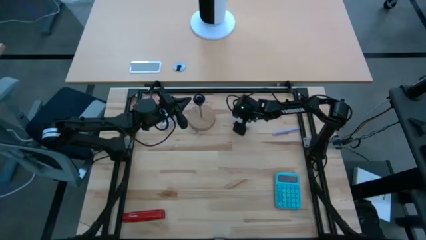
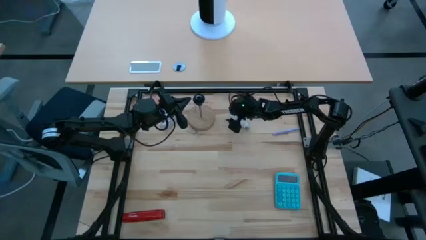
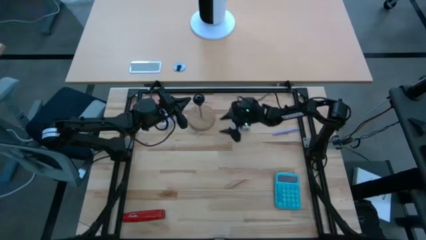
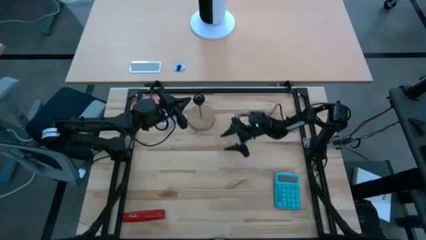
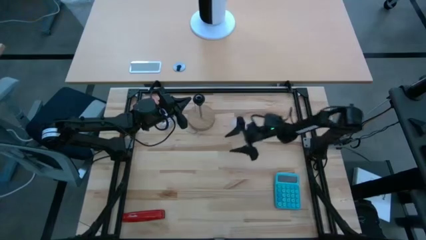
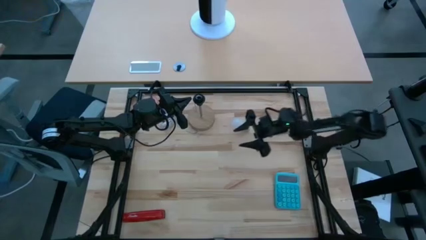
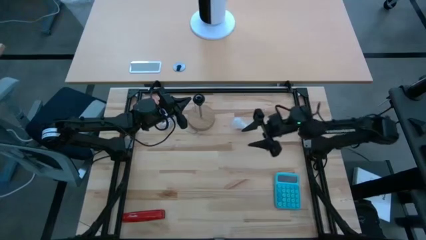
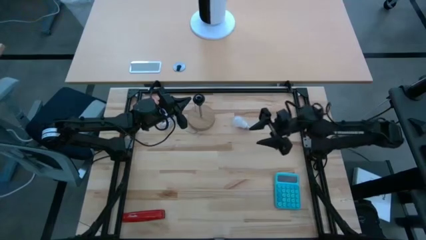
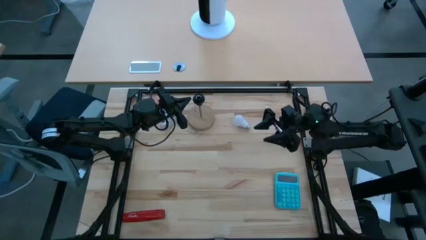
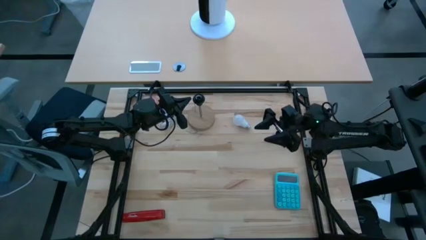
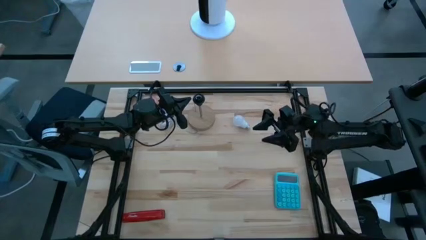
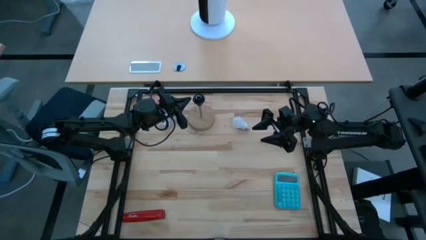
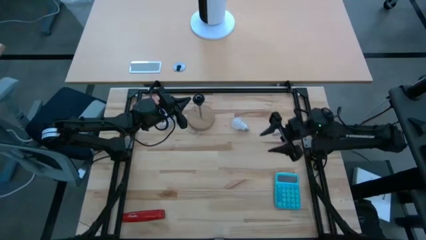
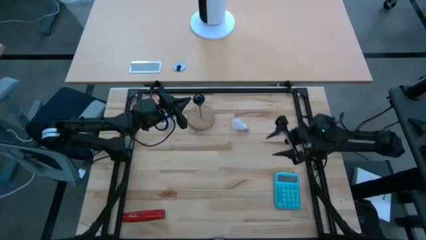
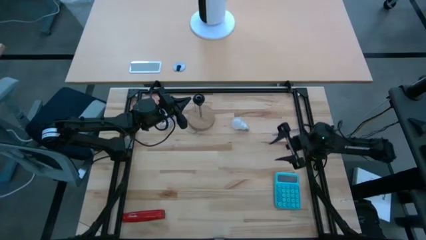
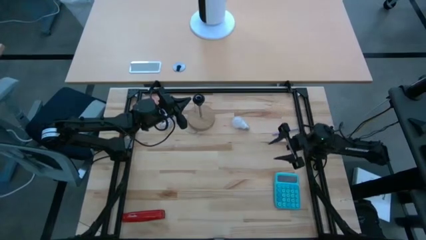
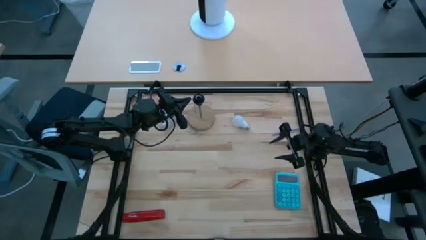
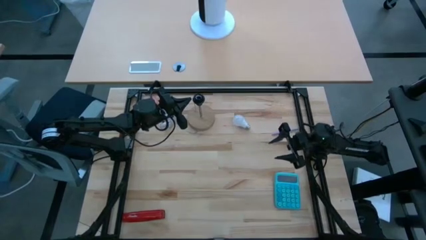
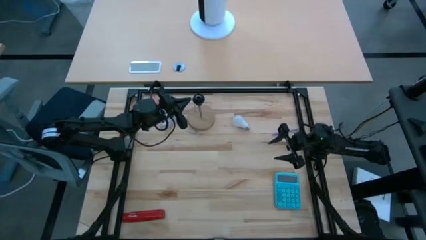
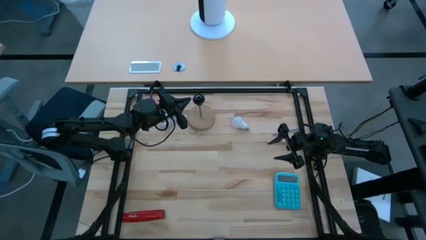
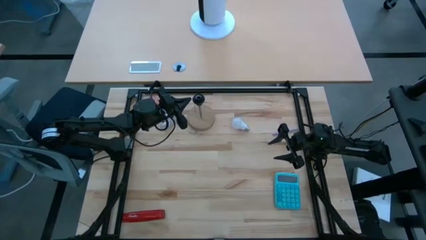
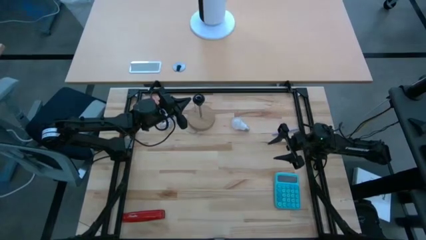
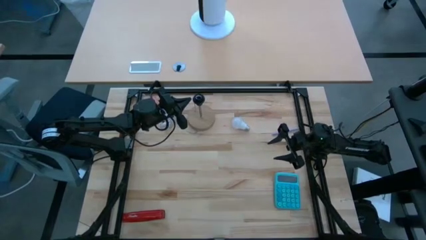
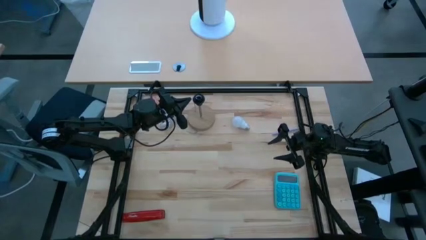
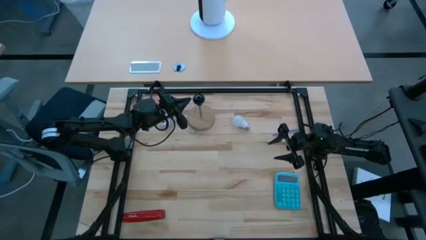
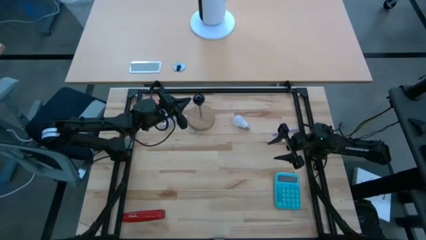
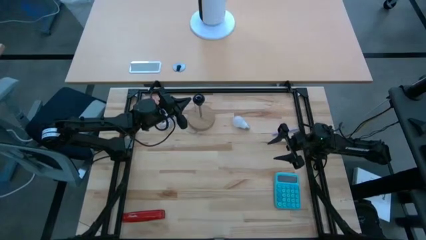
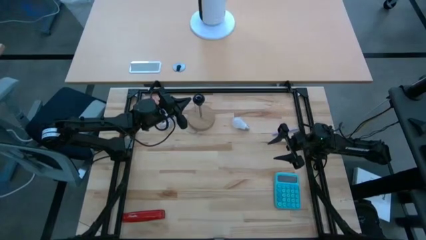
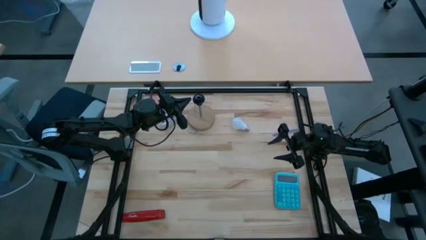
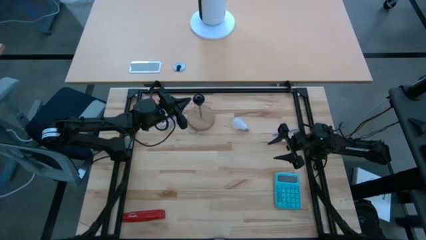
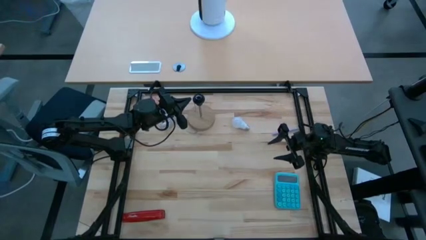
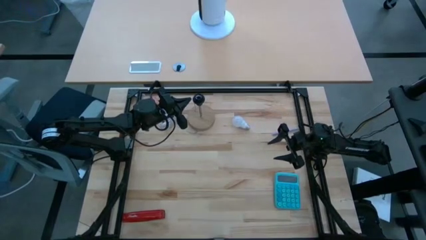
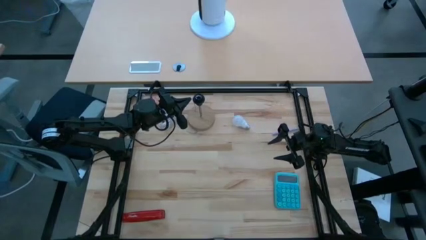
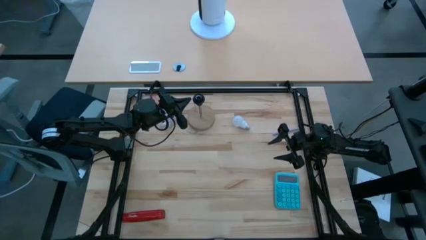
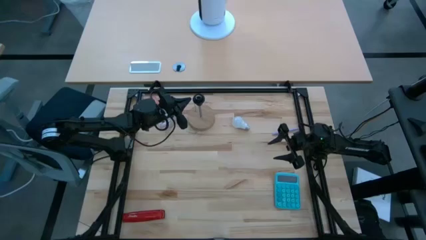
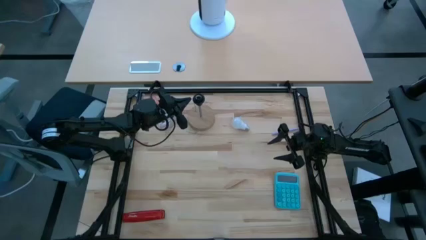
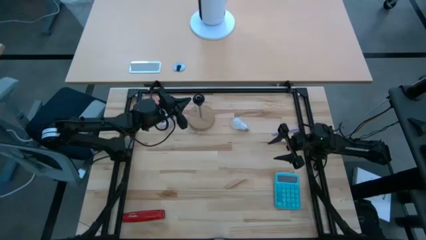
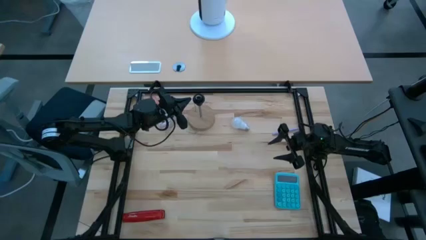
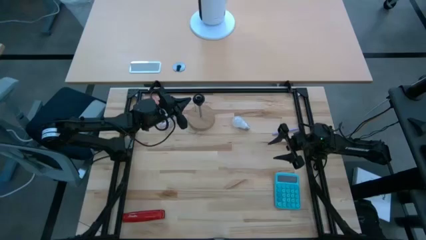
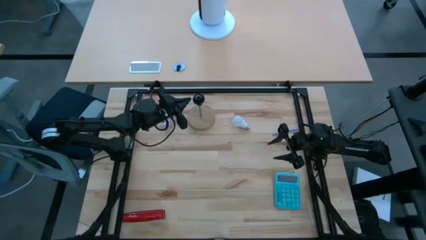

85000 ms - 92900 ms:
Task: Screw lightbulb
Return to Home Position

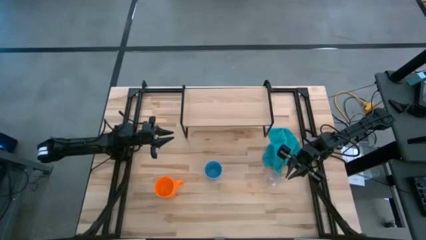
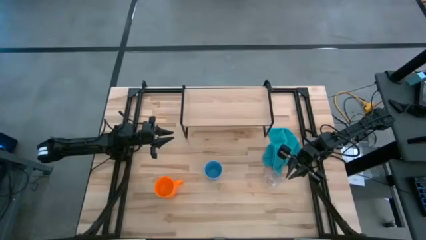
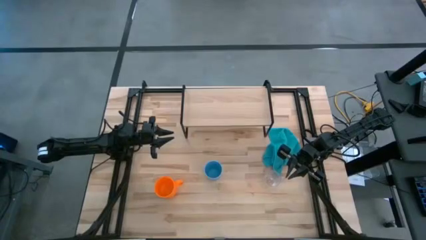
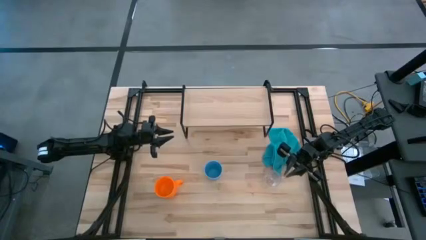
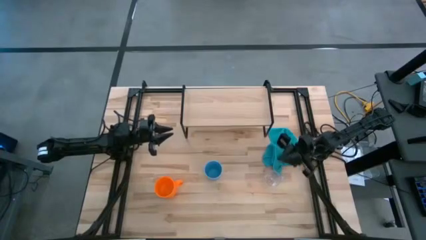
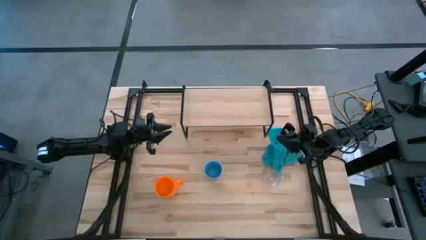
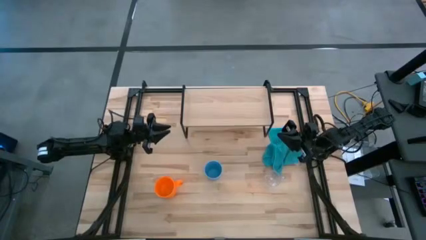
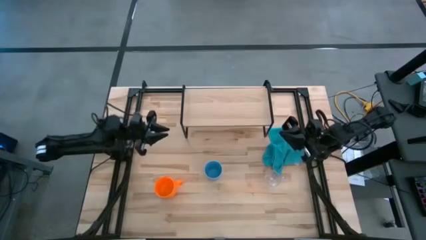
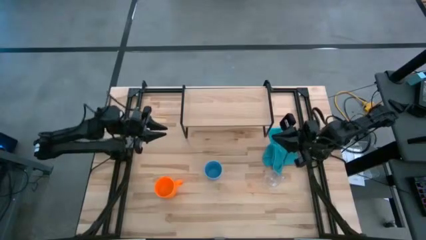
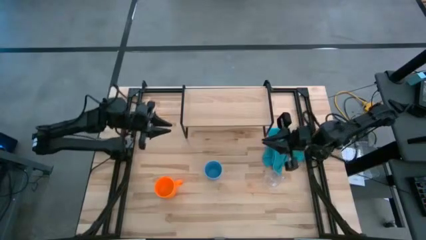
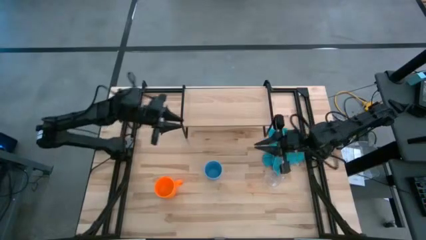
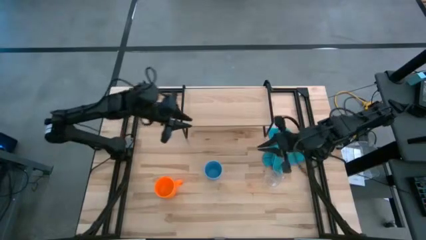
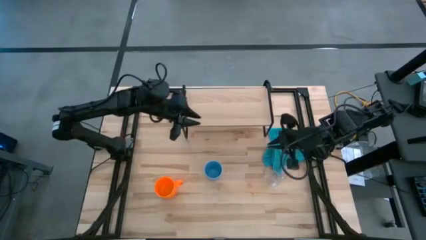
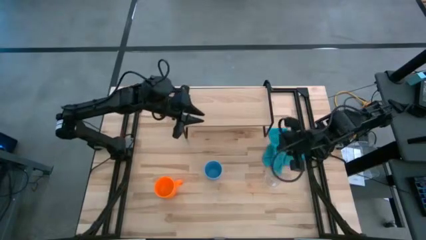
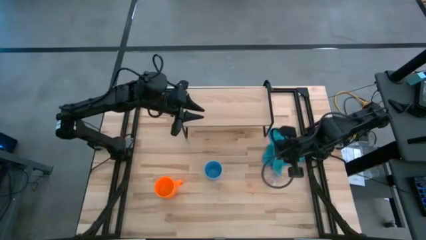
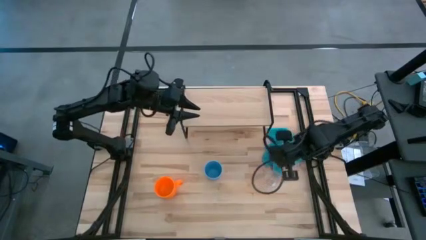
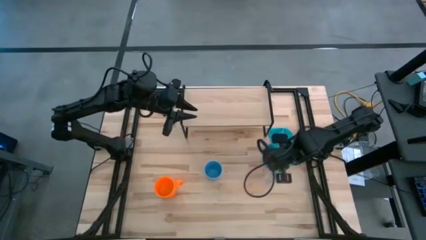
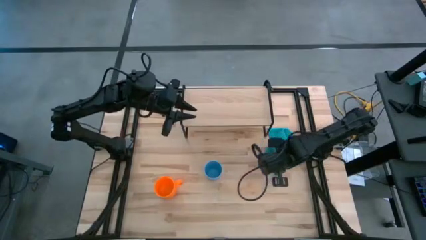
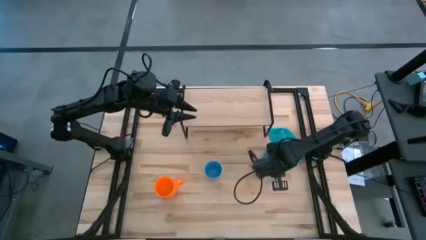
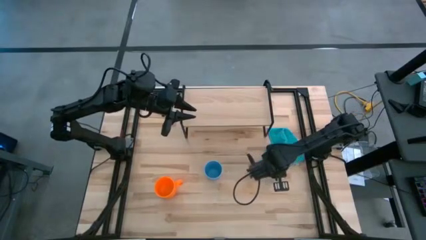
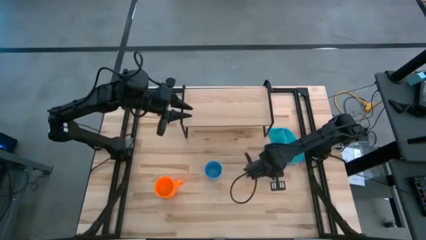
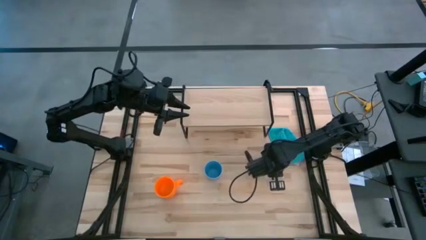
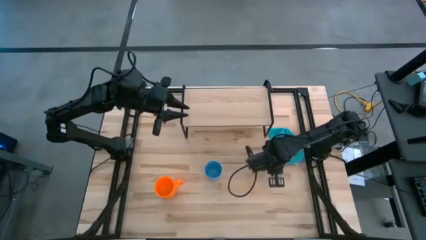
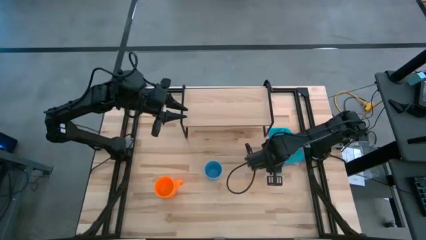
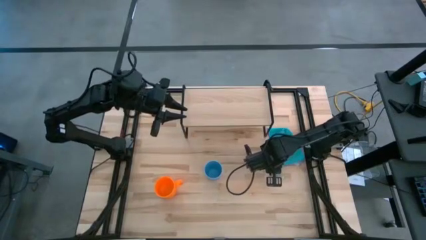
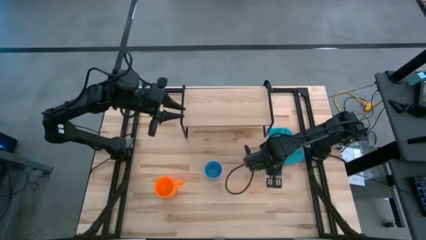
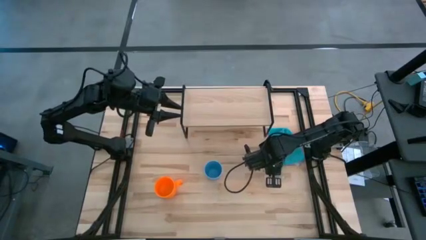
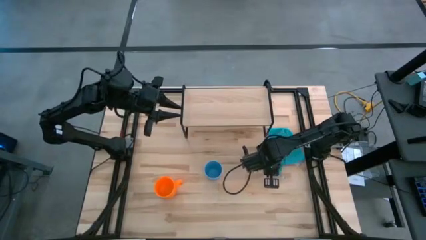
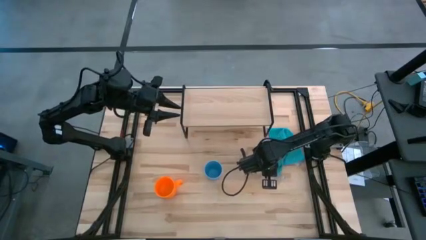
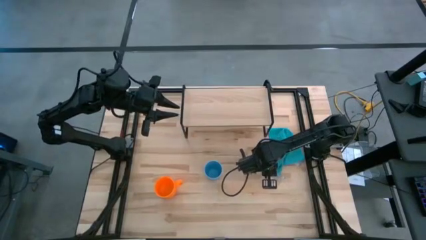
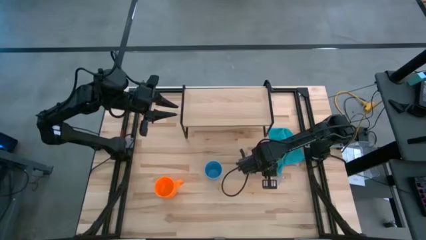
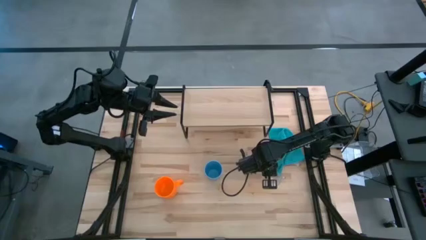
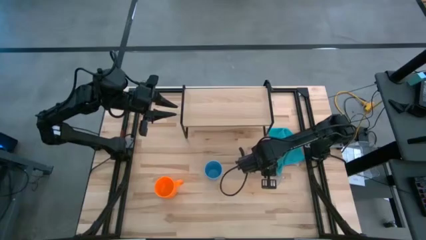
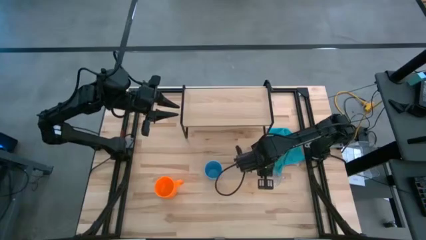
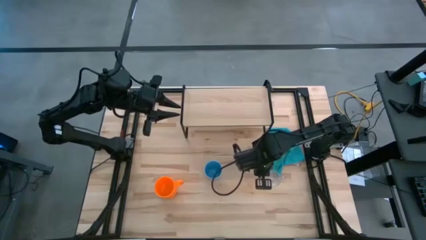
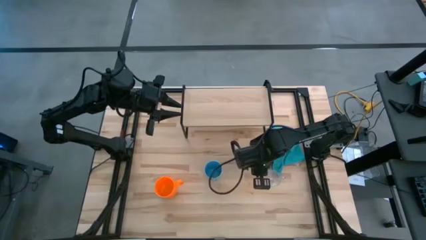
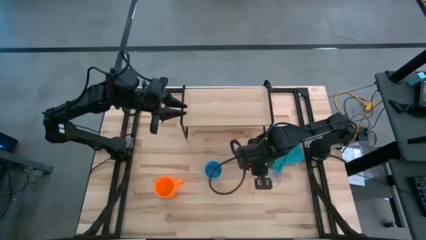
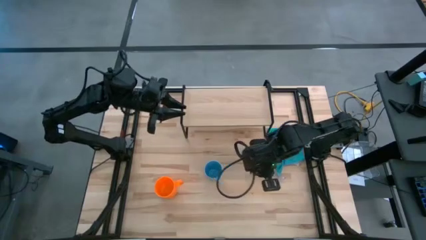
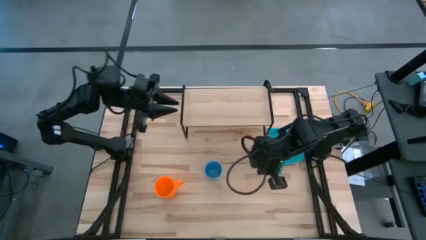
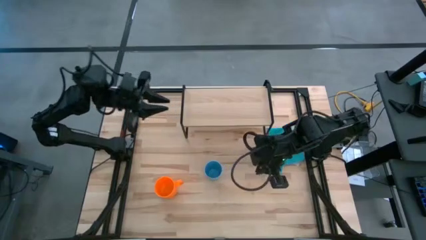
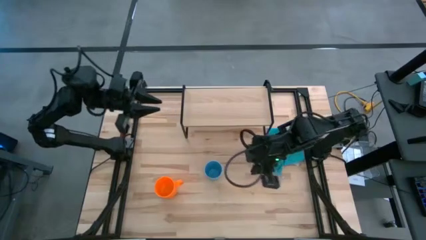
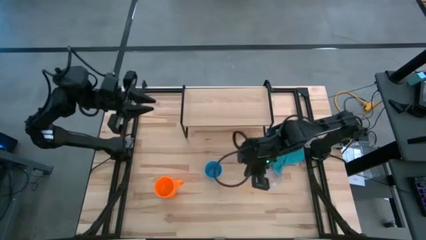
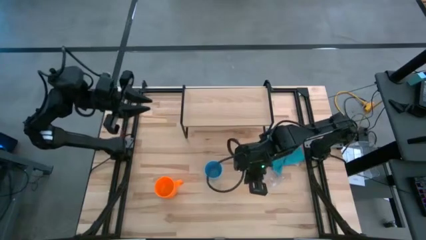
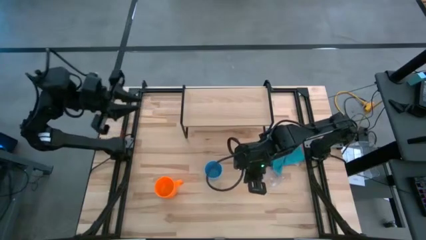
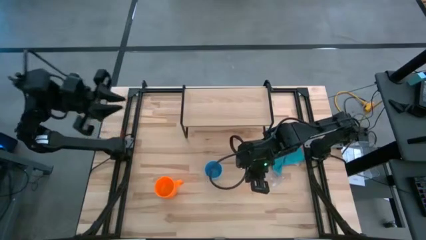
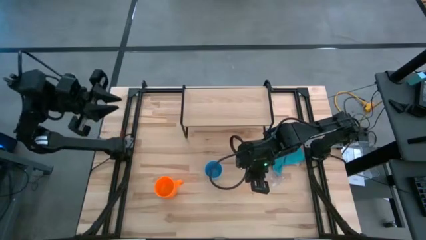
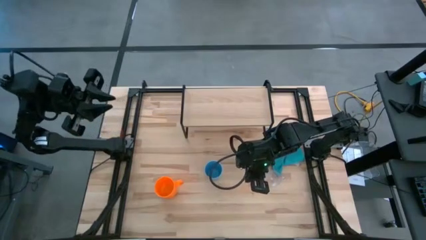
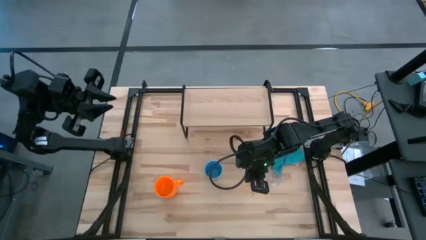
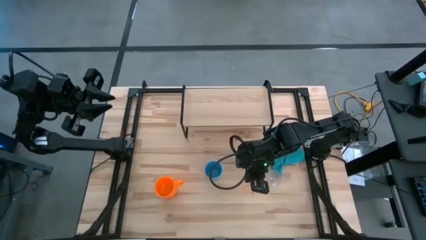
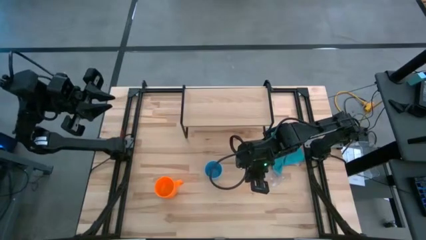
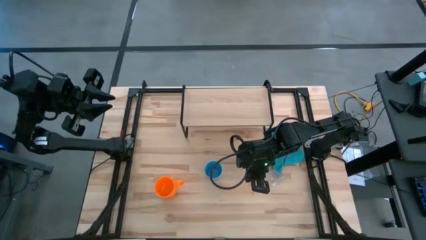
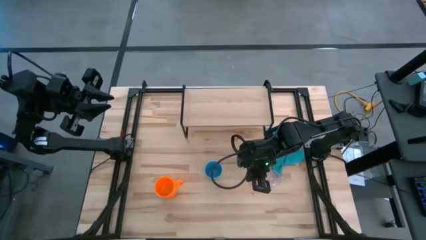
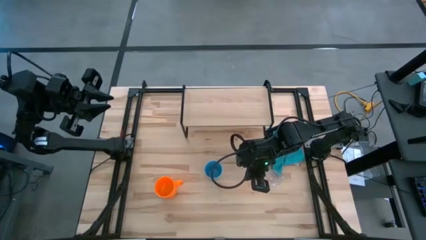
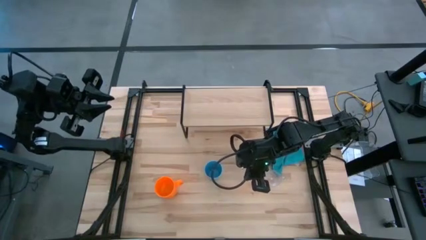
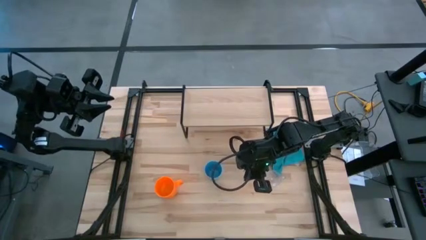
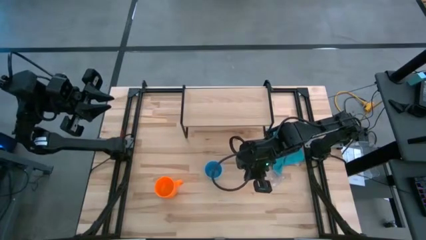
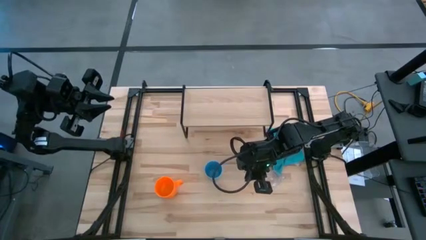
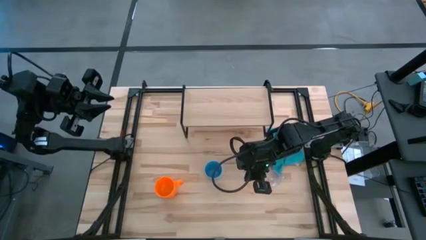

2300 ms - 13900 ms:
Task: Stack small to large cups/mugs on shelf
Put the transparent cup on the shelf
